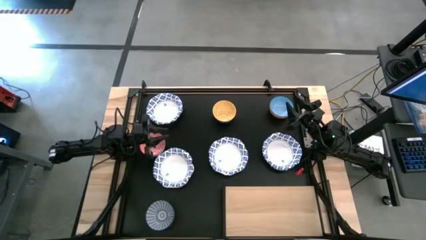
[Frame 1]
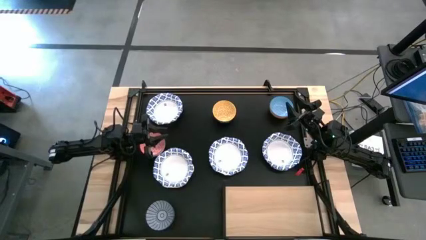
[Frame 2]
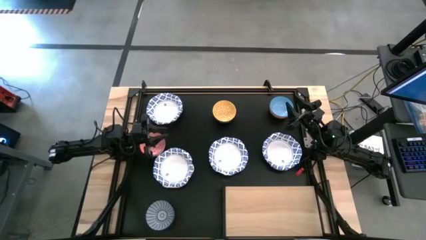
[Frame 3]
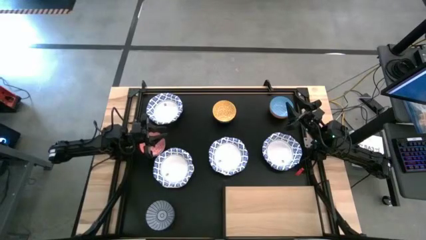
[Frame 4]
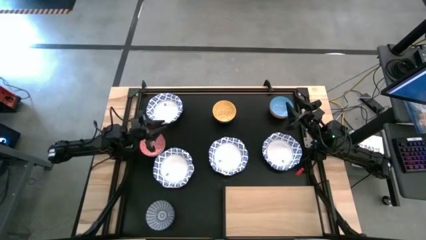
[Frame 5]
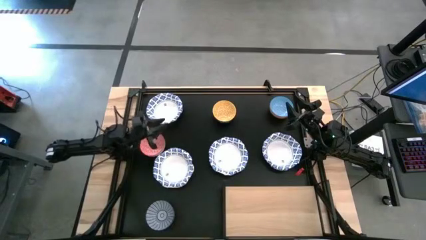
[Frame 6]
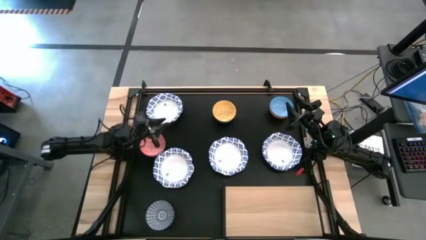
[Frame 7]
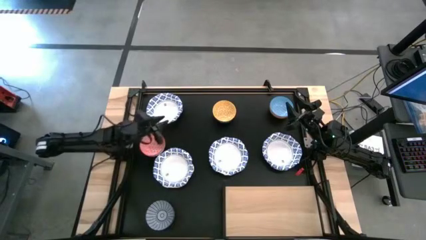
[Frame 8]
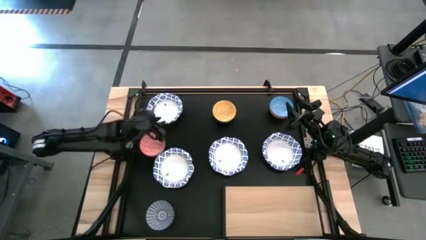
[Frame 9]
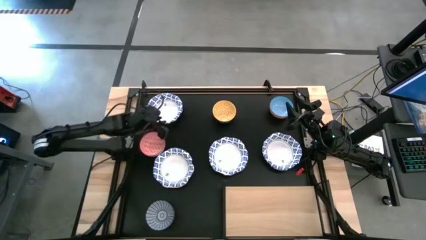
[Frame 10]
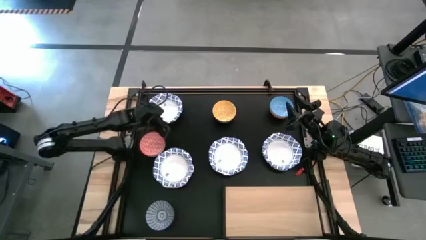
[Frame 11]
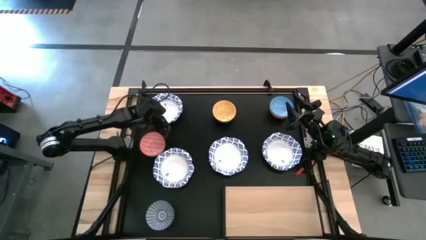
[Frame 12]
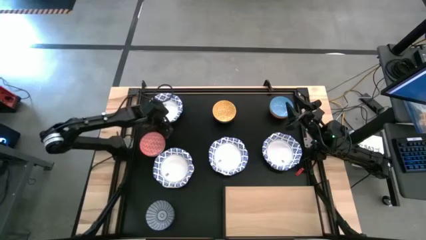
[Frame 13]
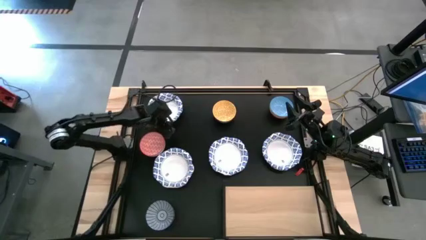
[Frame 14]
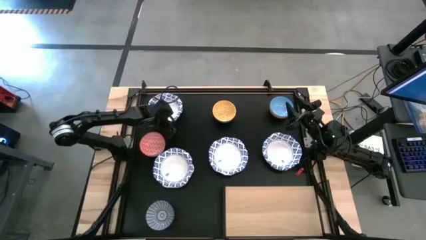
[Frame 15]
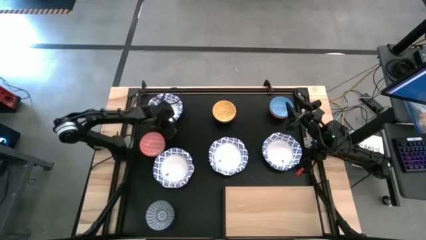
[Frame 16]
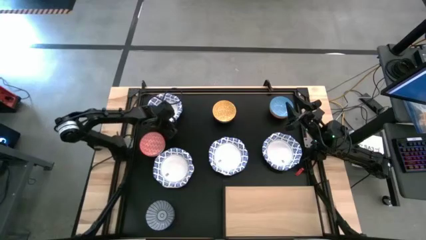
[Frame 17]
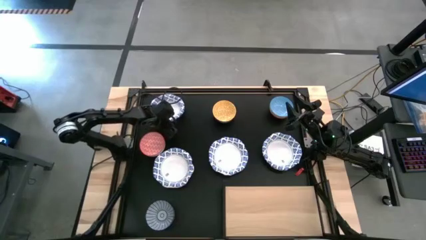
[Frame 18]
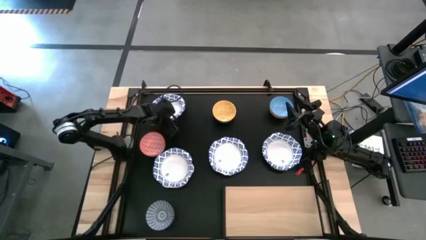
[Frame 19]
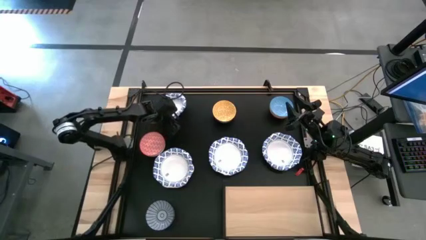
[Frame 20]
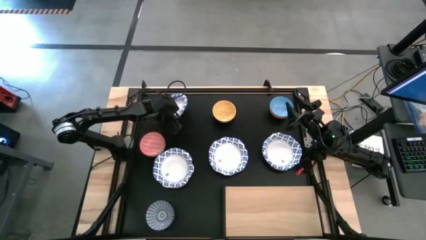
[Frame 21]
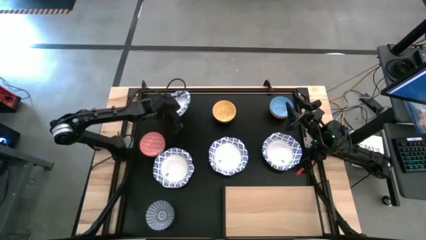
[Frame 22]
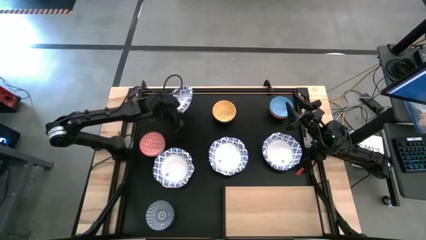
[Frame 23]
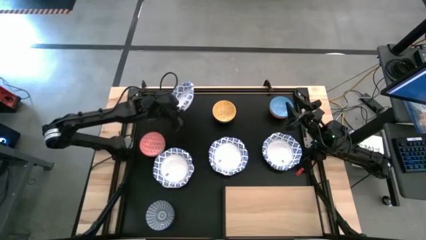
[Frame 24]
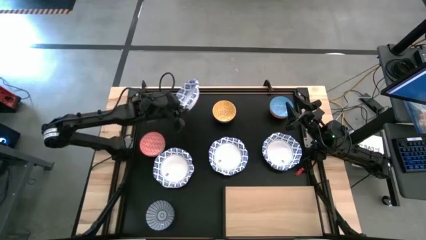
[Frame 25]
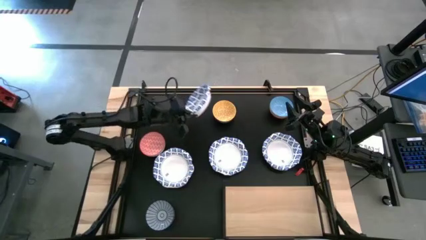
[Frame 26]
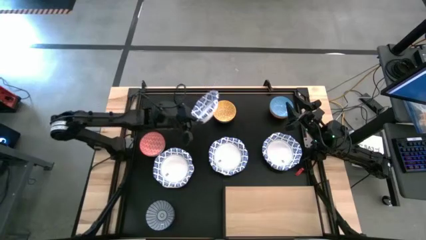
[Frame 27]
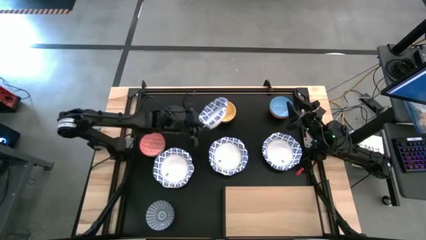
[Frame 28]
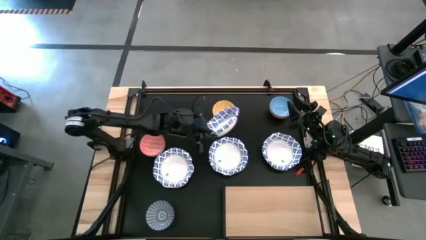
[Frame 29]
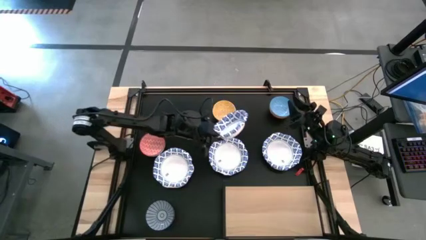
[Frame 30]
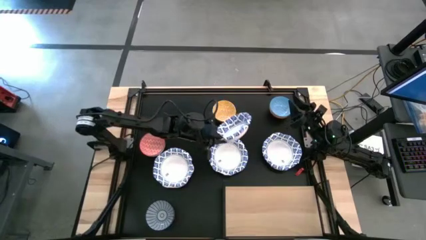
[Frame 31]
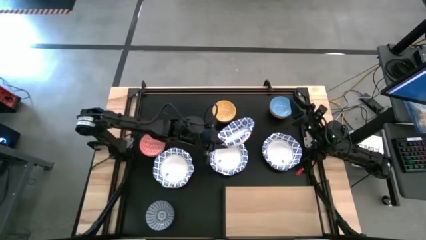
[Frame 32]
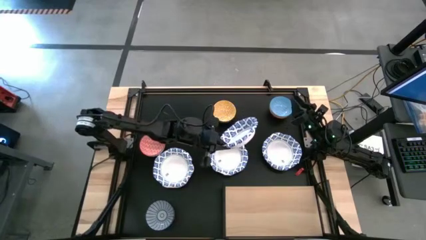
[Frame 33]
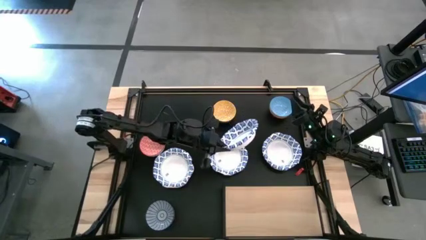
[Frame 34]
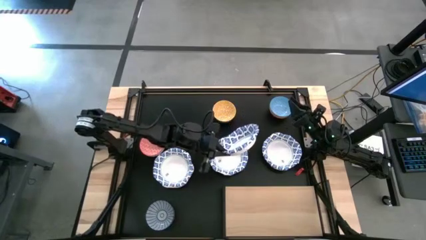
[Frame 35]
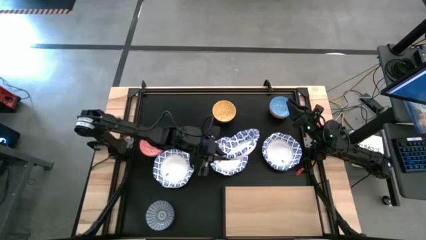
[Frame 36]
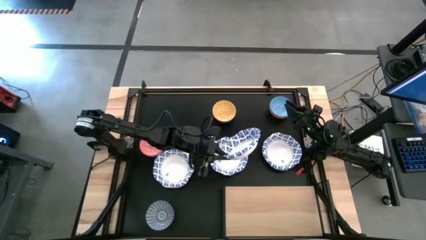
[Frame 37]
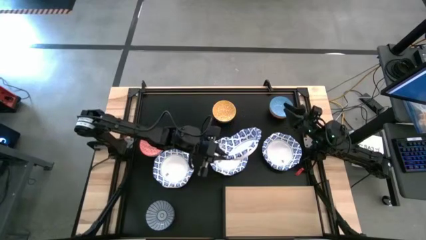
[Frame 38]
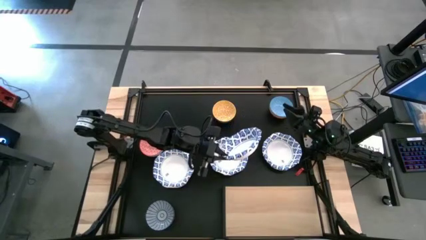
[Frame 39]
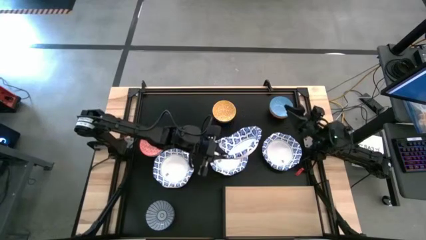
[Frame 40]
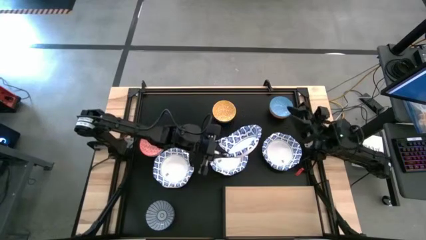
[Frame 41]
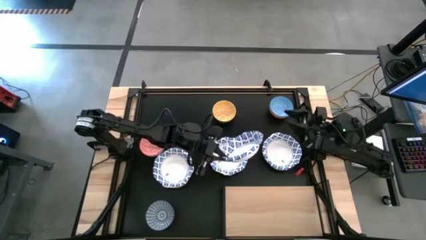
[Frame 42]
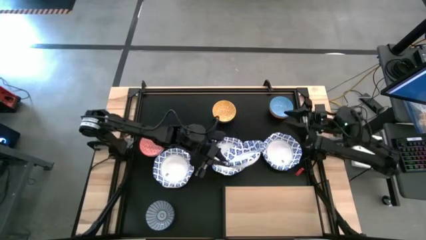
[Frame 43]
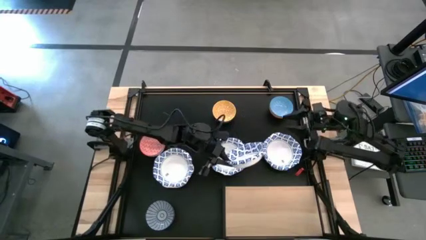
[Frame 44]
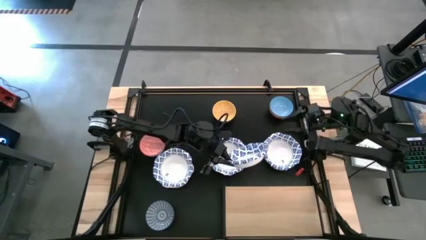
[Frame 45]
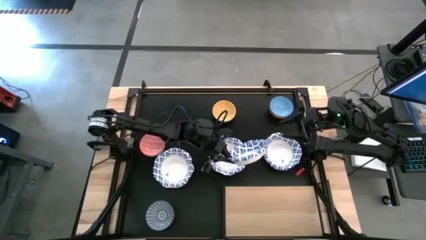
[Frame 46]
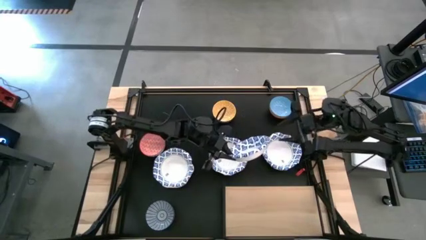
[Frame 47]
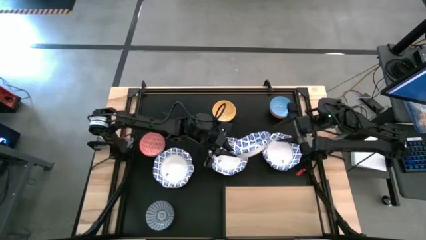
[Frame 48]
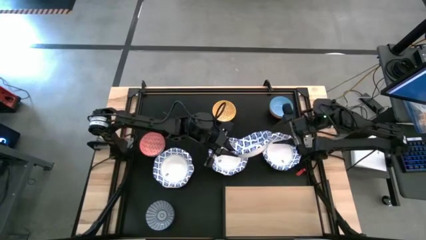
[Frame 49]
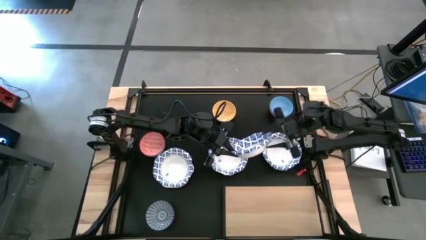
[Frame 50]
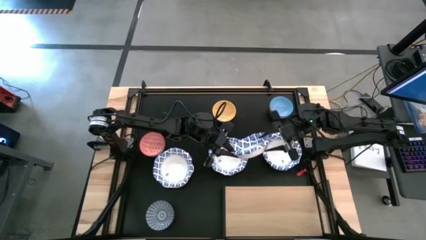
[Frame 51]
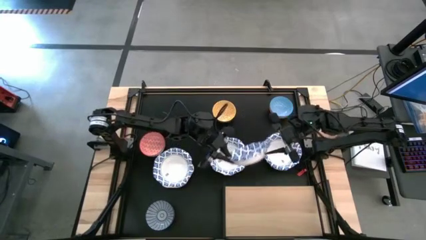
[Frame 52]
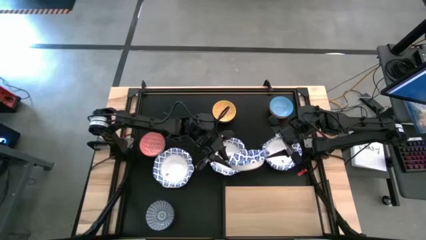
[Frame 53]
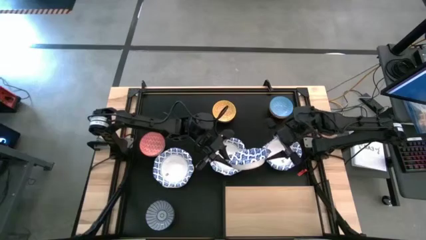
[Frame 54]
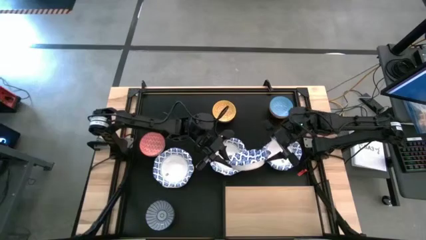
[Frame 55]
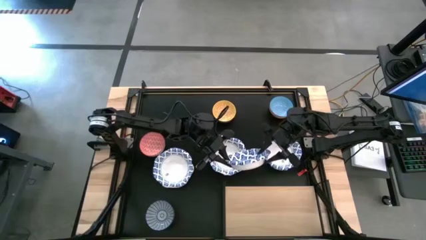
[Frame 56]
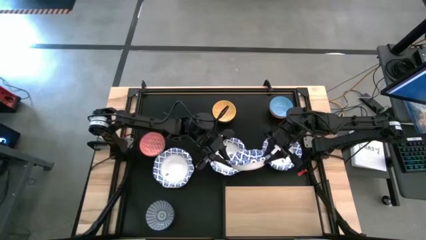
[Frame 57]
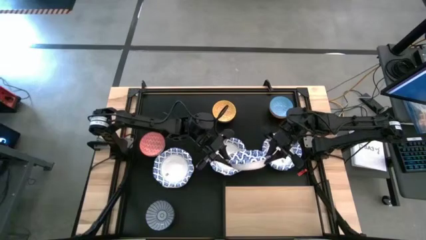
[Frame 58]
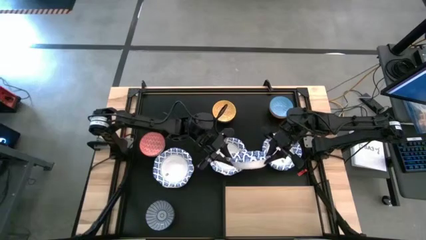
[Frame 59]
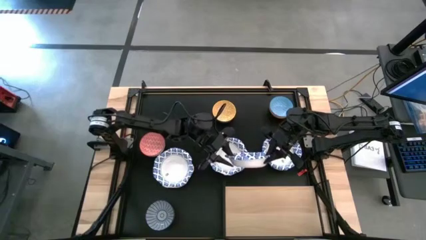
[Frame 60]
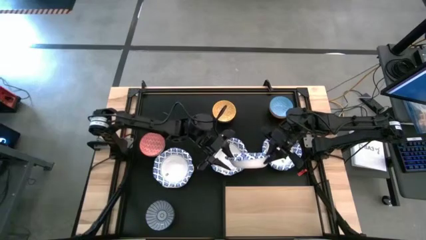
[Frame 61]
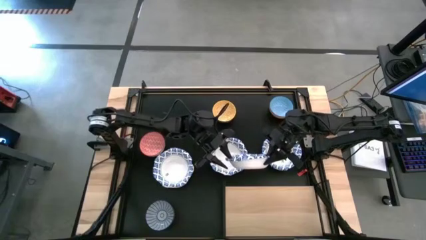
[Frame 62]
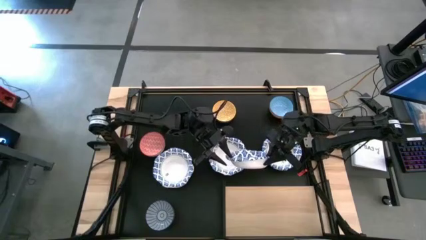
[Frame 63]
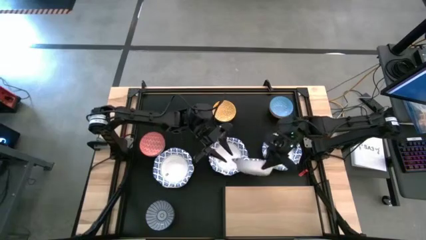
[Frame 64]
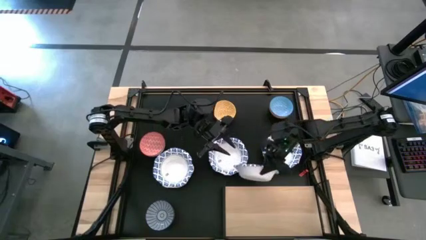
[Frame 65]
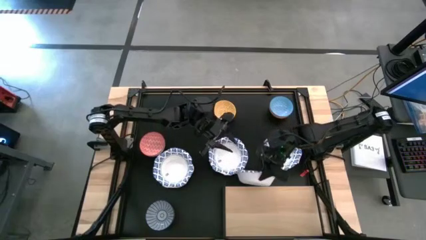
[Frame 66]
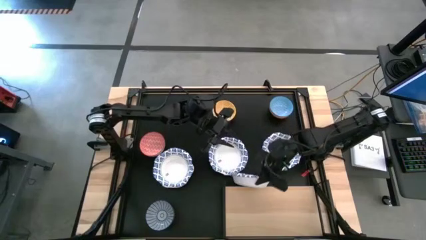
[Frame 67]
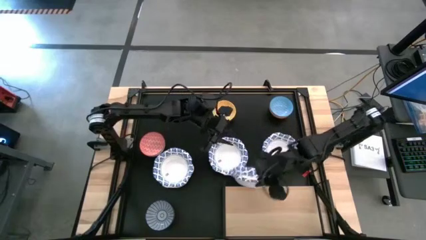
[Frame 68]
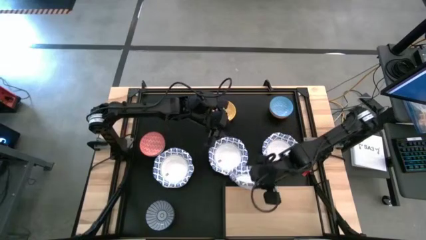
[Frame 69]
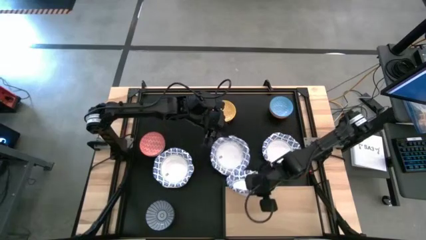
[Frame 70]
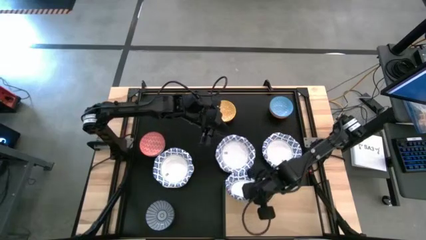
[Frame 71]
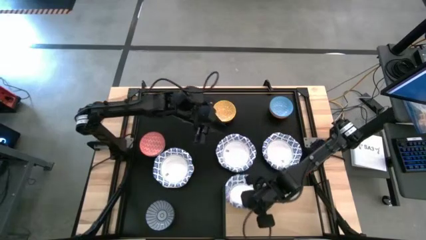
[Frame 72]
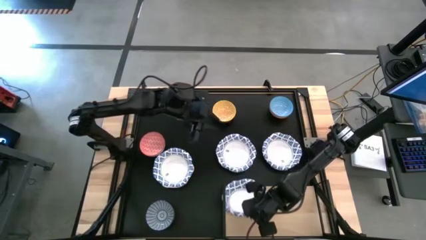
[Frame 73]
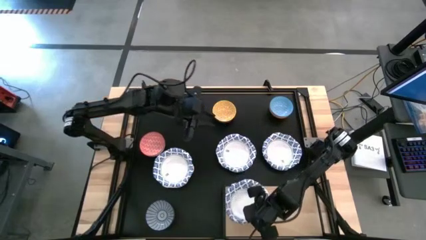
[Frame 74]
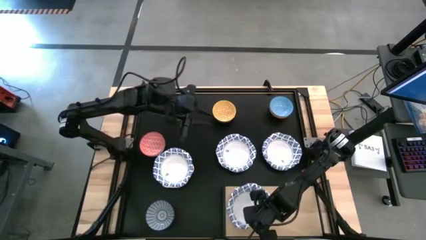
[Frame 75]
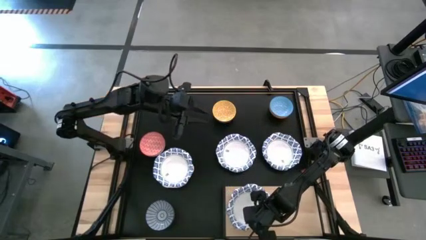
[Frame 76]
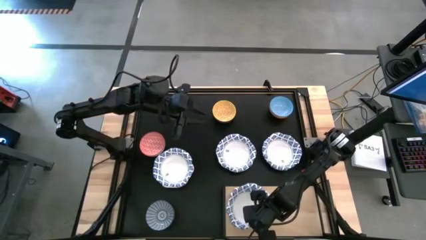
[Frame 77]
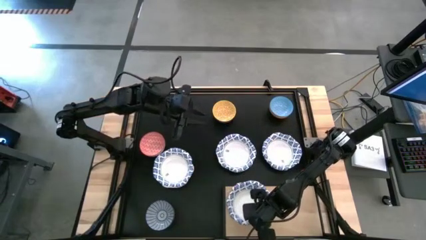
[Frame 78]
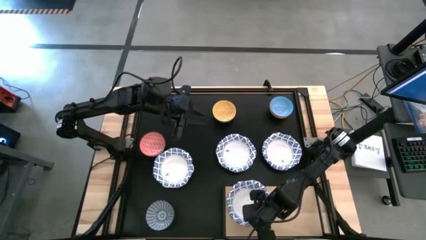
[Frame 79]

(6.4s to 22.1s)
Task: Place and stack bowls onto a shelf
Put the top left white patterned bowl on the shelf
